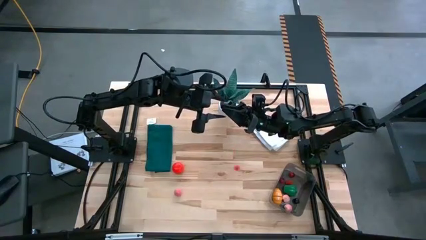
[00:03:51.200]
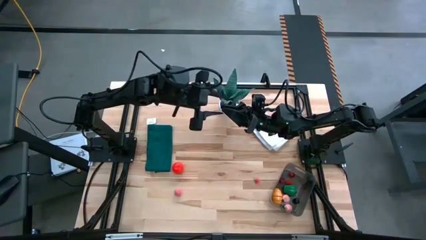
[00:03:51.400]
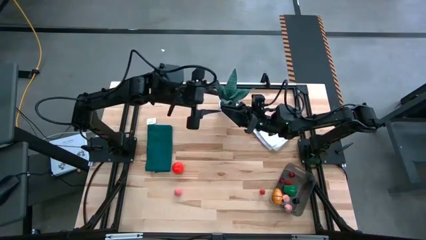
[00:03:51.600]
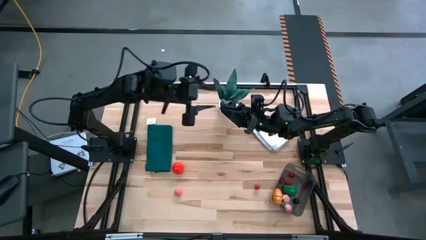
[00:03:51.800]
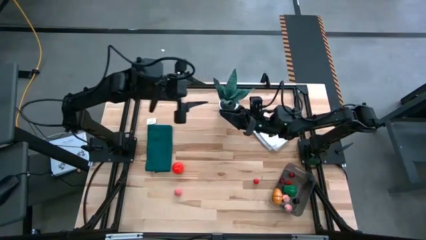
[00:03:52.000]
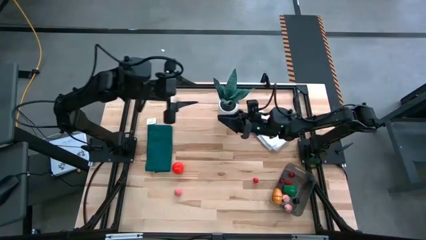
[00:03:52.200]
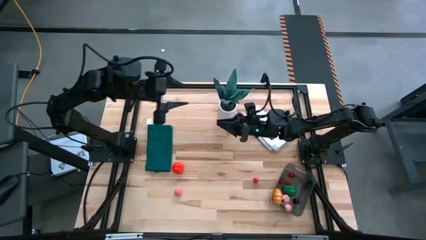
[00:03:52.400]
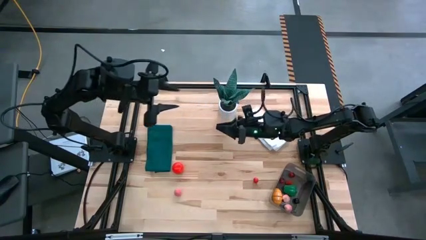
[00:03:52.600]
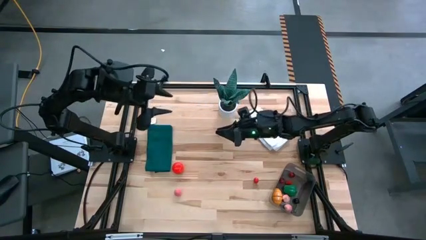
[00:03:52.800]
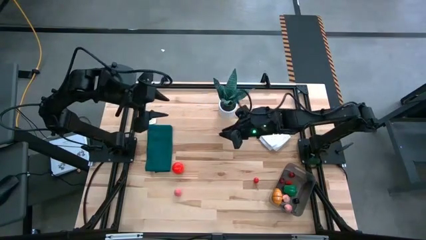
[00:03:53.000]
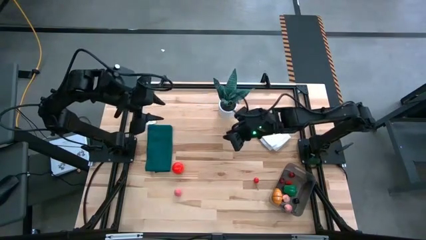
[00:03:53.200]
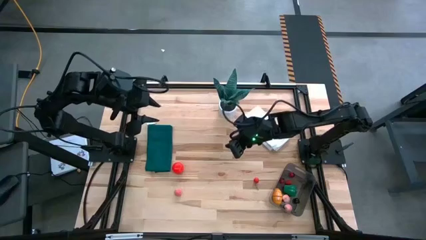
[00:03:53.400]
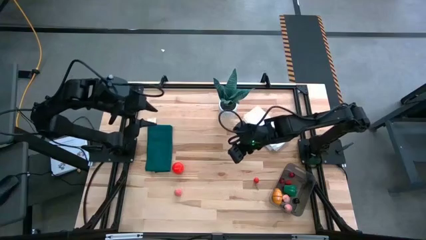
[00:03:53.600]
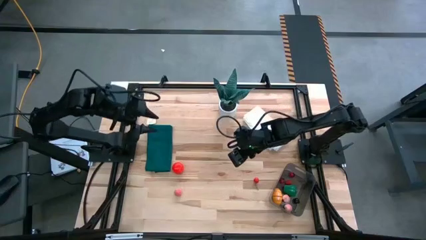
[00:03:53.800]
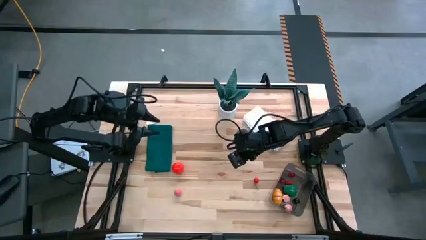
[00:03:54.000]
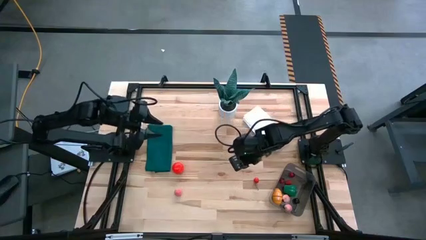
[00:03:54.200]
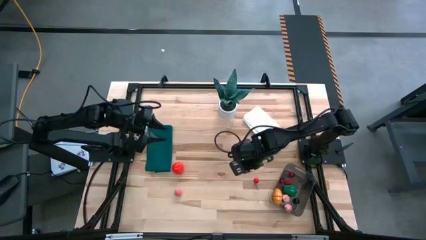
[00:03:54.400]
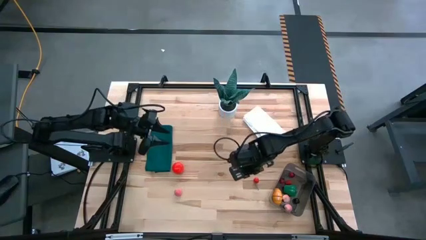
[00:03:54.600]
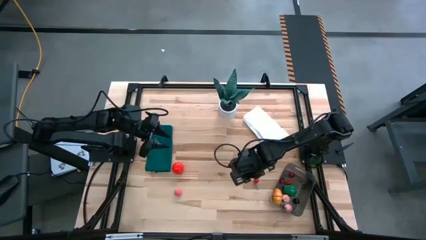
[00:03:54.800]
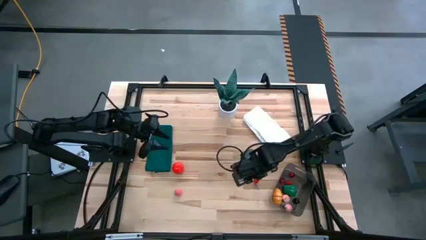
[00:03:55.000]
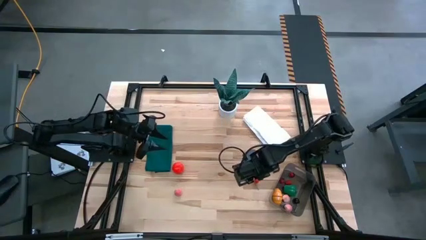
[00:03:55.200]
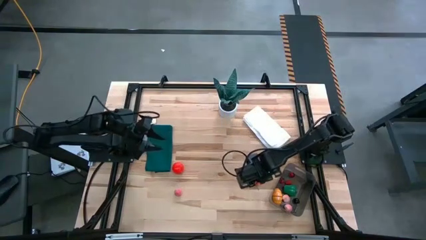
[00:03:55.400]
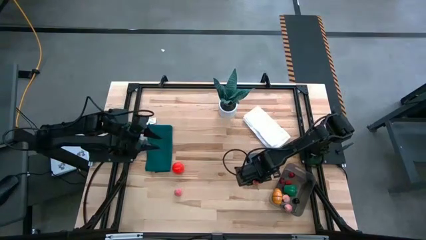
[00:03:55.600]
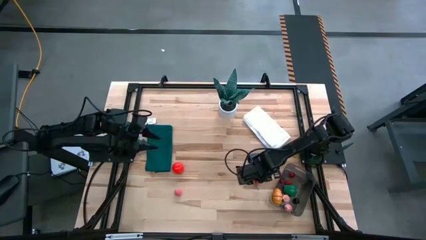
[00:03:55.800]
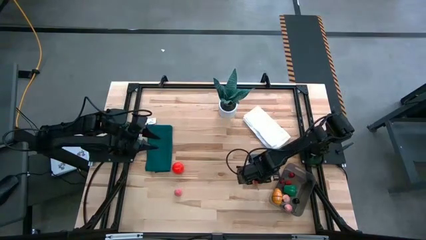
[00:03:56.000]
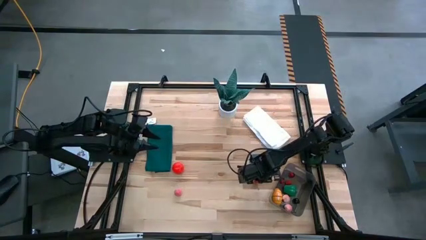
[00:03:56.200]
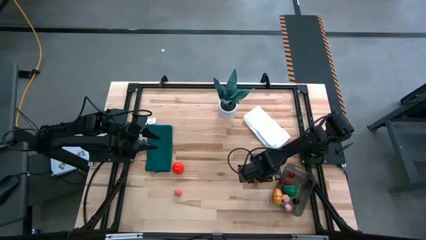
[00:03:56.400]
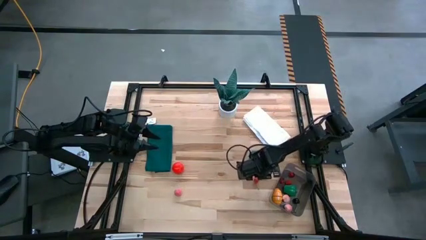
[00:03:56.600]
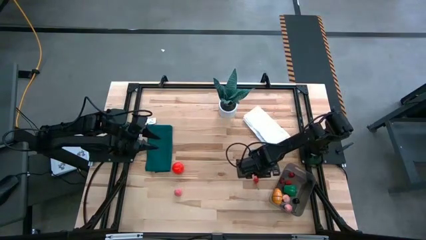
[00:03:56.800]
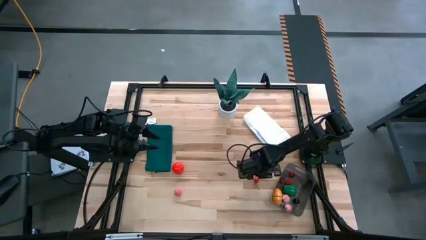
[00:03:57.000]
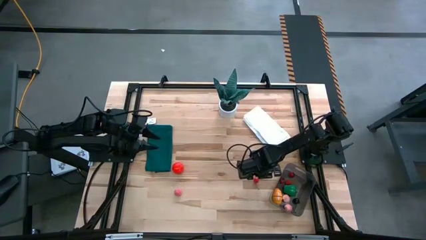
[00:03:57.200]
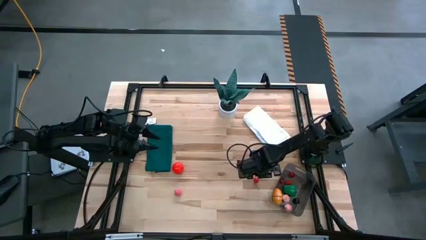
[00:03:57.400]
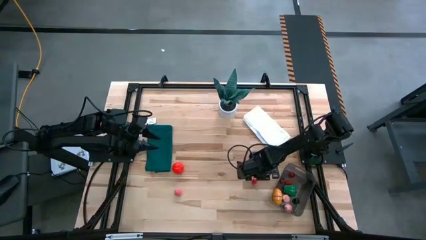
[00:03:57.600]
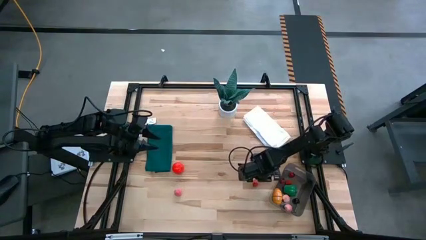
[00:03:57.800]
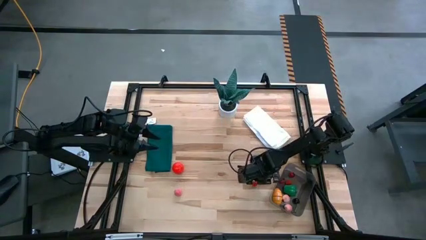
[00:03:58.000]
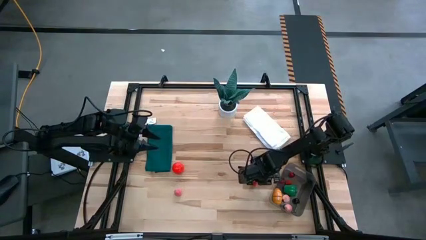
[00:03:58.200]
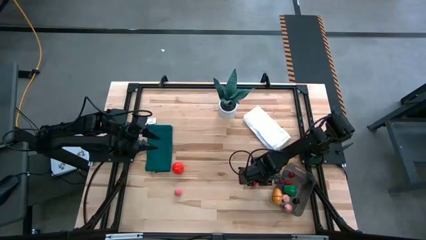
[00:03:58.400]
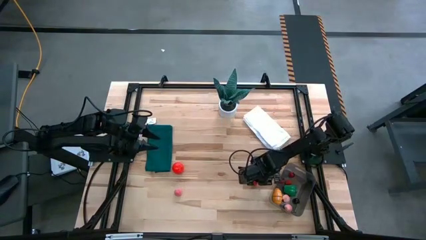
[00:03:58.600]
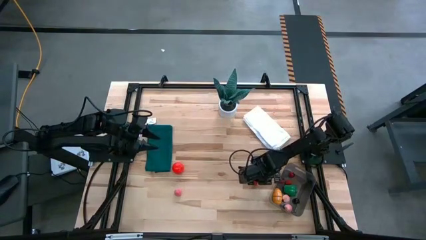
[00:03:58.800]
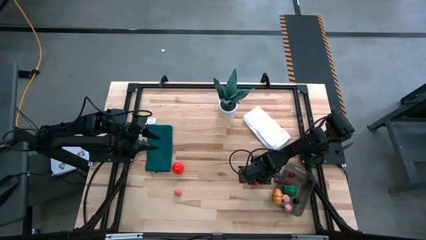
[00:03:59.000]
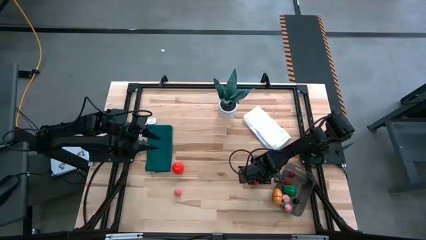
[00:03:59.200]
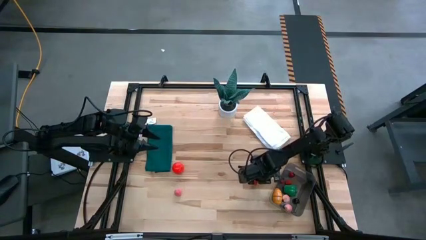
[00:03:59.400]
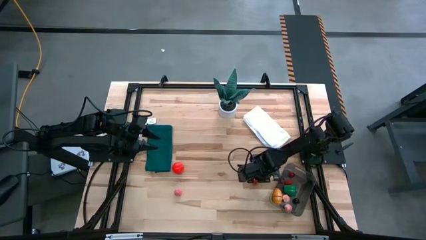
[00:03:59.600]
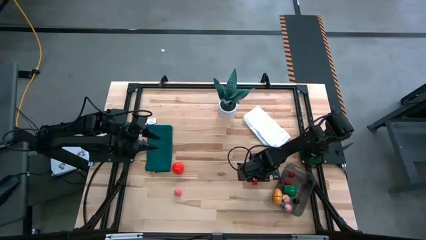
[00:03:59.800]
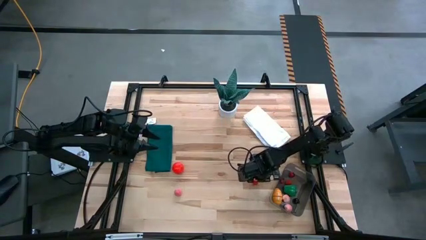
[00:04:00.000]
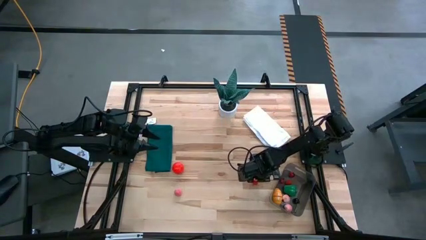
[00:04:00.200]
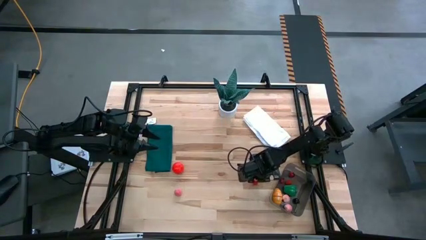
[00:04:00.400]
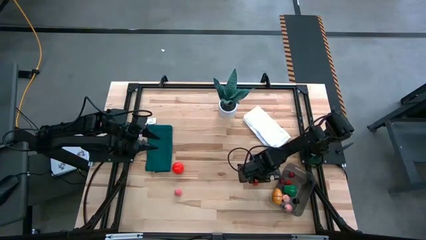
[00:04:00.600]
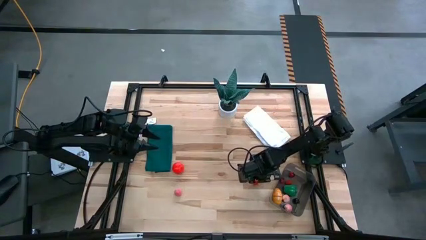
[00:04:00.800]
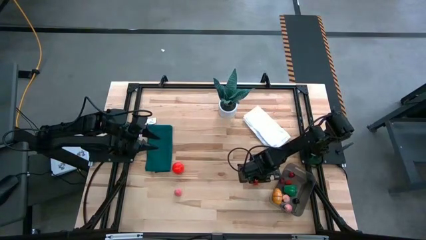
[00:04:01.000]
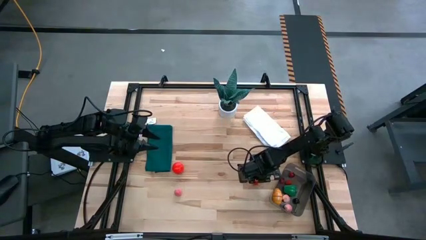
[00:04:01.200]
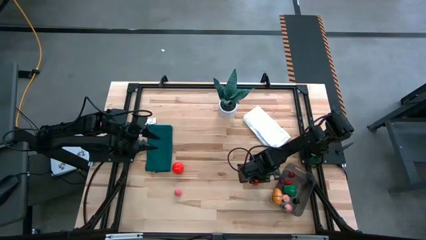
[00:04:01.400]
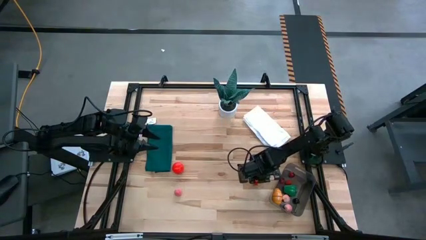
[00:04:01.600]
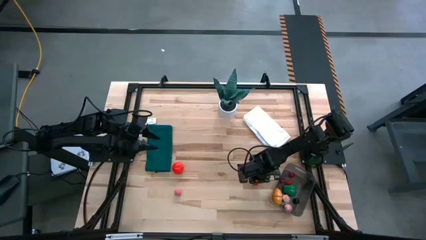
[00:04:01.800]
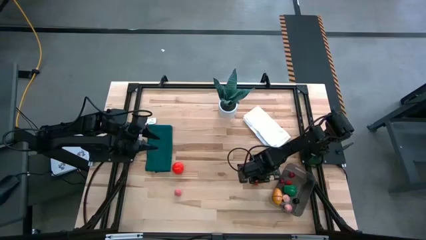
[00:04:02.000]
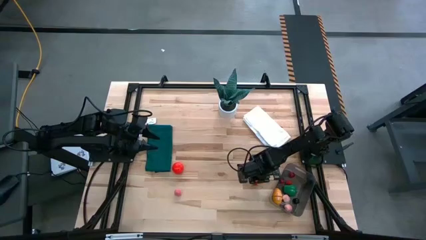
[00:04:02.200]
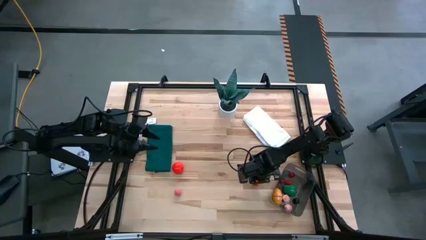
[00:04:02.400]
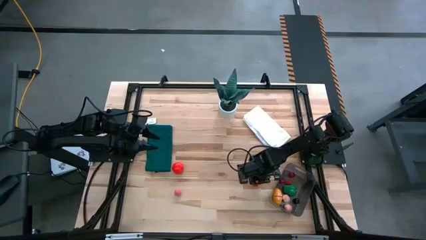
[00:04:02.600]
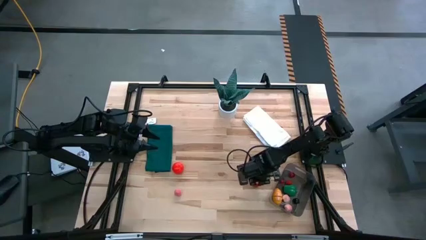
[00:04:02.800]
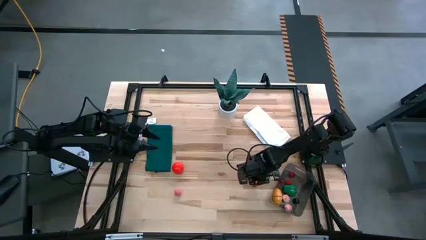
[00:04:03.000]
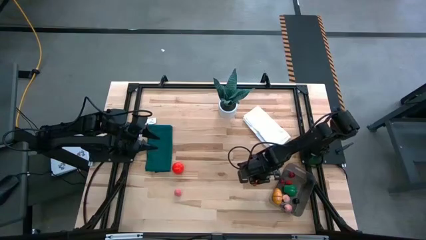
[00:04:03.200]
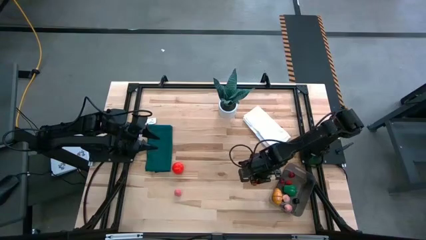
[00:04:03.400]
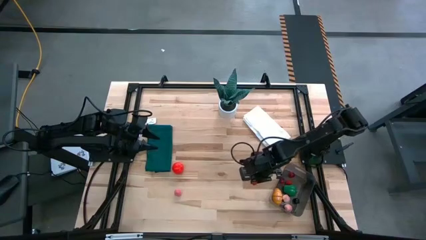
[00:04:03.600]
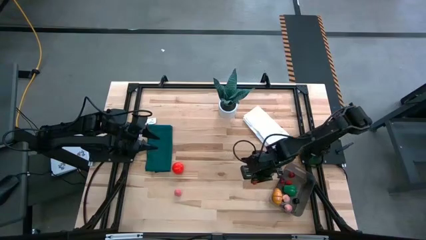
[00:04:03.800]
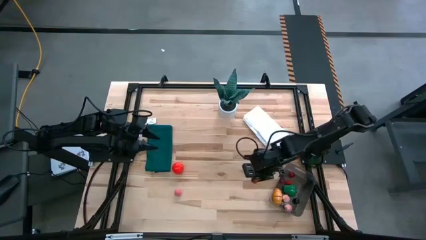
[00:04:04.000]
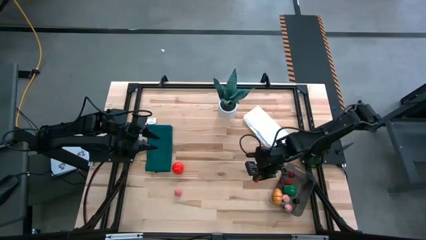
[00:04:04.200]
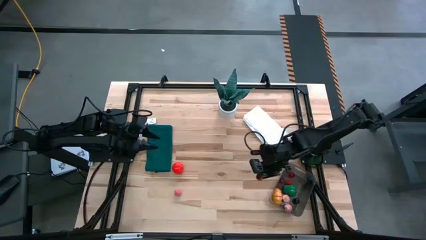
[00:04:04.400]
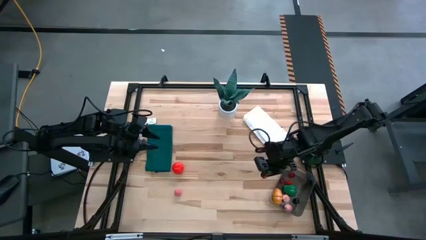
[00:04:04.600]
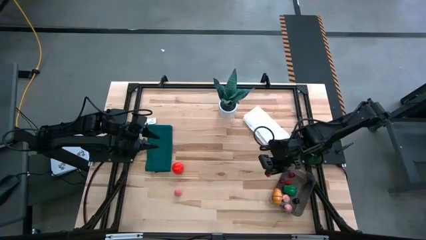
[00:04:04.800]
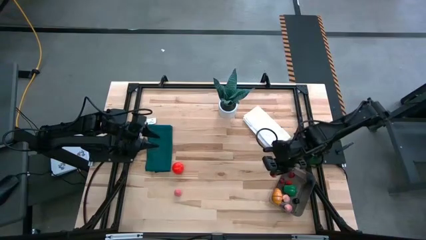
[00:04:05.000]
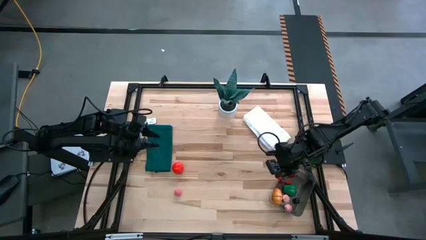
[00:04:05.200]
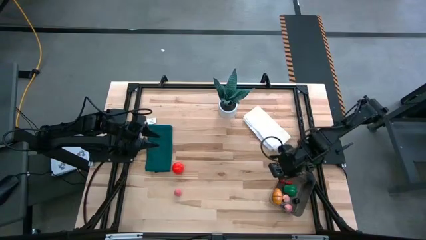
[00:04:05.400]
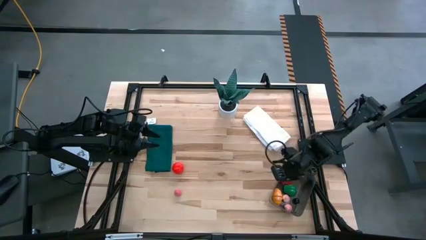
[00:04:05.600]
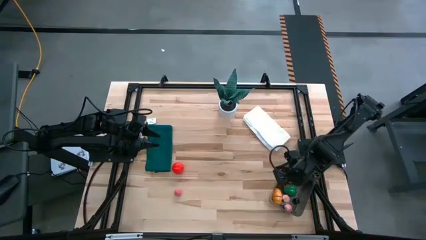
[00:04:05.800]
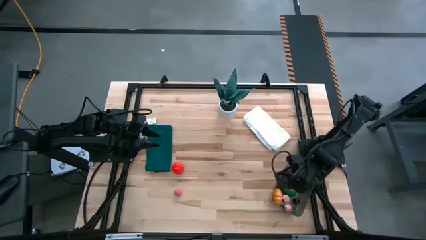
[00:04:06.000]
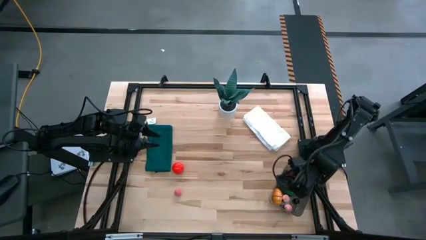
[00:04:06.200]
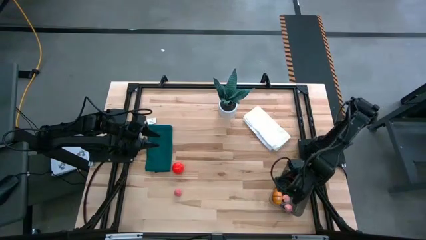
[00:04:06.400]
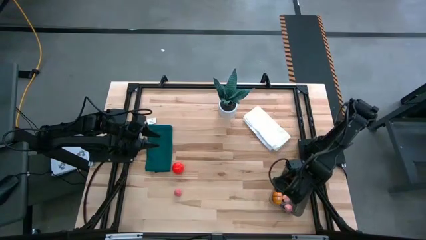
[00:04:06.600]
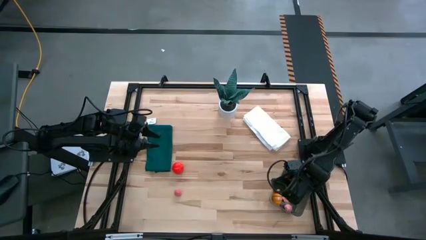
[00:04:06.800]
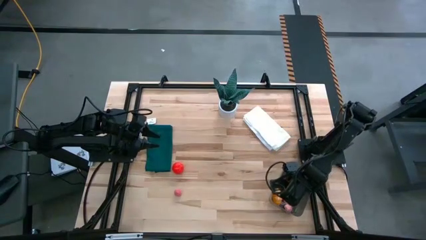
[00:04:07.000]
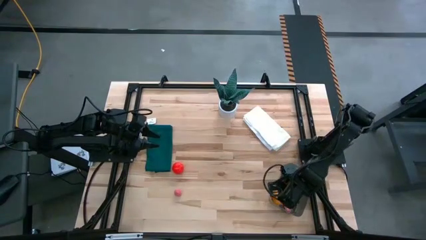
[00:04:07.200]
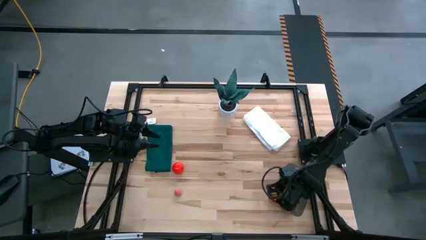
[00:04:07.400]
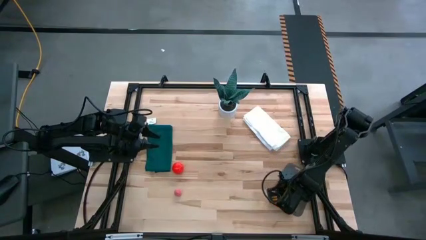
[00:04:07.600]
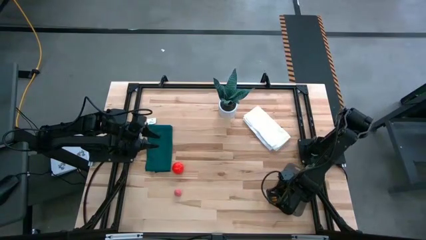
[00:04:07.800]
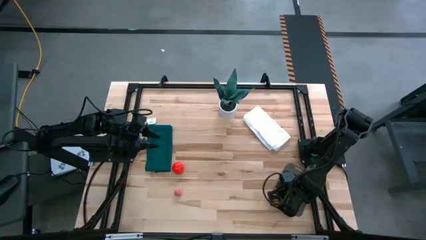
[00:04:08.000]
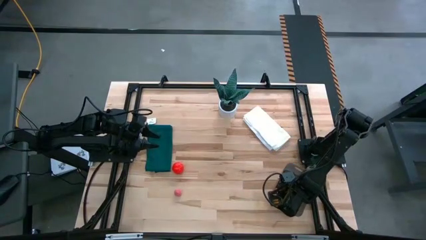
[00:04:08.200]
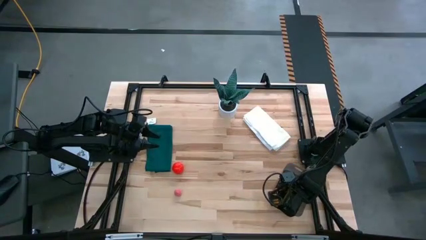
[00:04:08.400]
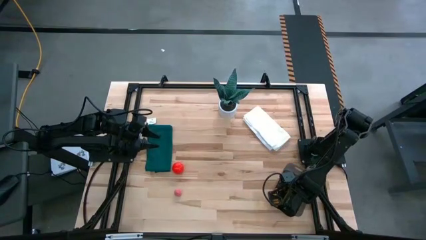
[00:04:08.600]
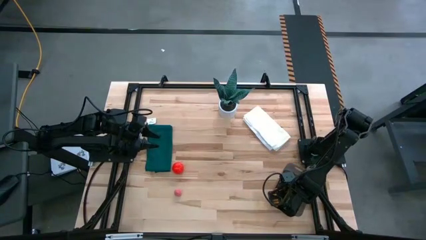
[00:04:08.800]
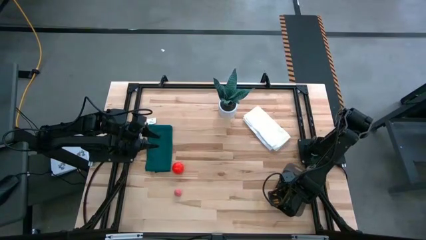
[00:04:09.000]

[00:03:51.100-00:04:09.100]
Task: Pick and placing Produce into tupperware
Put the red cherry into the black bin
